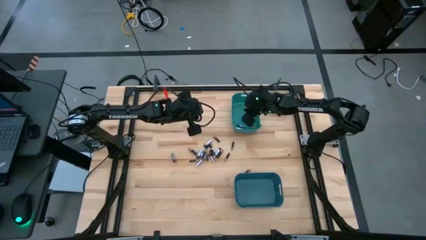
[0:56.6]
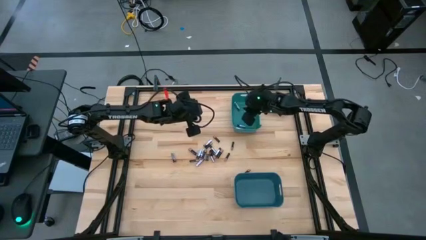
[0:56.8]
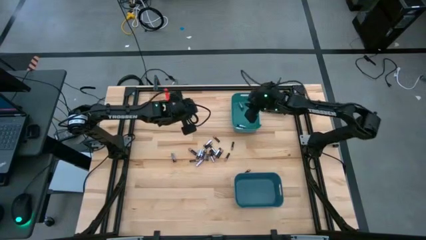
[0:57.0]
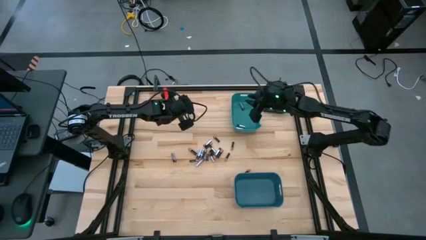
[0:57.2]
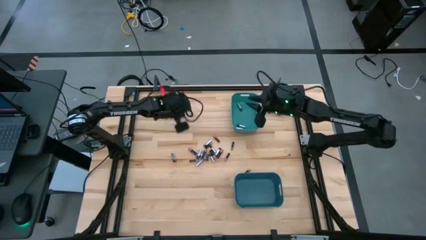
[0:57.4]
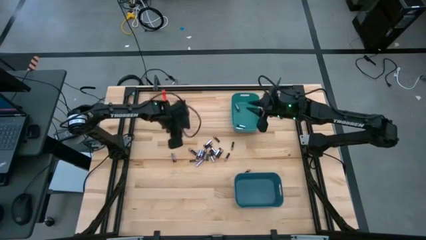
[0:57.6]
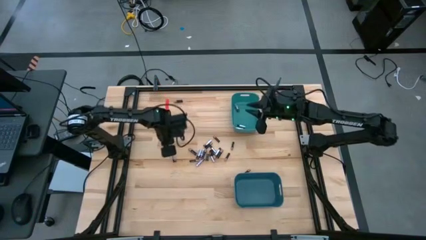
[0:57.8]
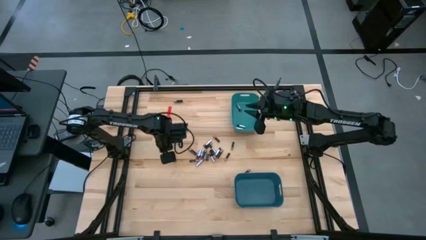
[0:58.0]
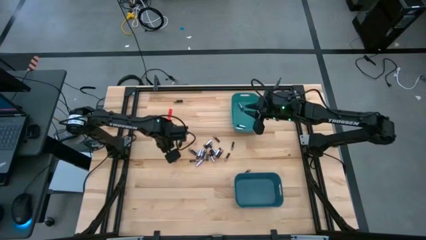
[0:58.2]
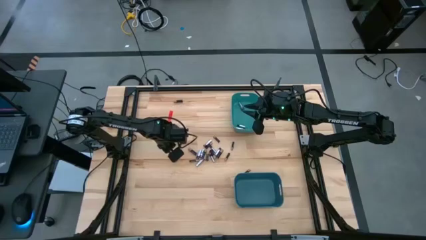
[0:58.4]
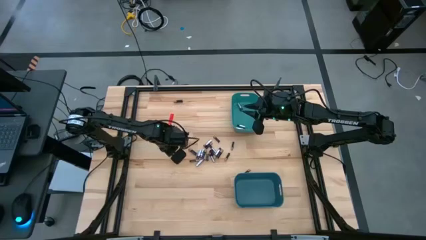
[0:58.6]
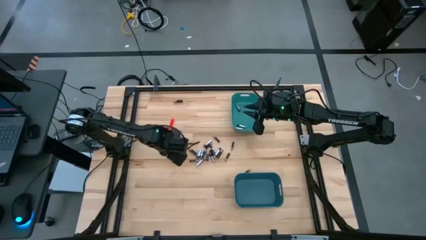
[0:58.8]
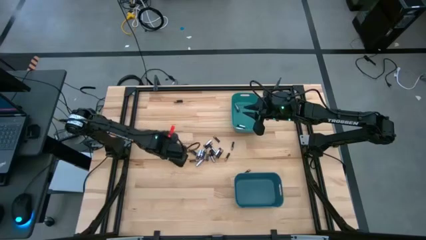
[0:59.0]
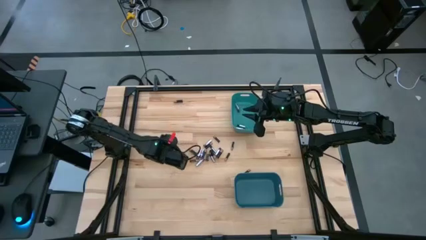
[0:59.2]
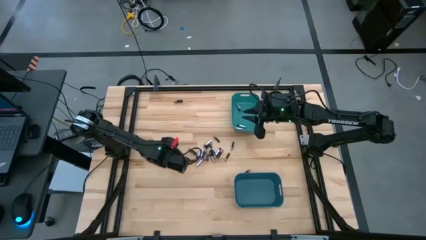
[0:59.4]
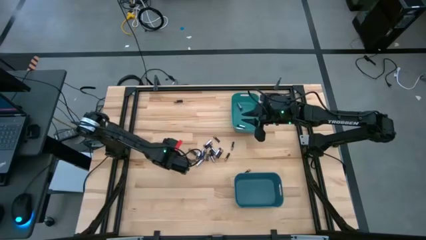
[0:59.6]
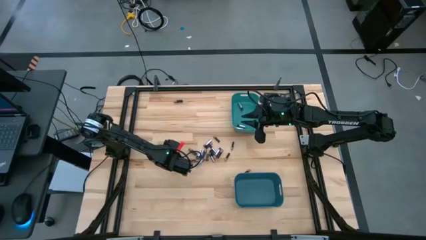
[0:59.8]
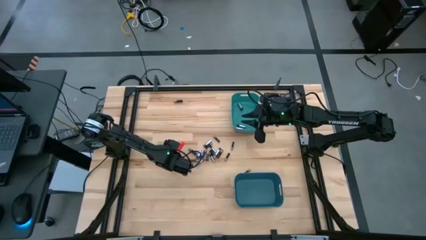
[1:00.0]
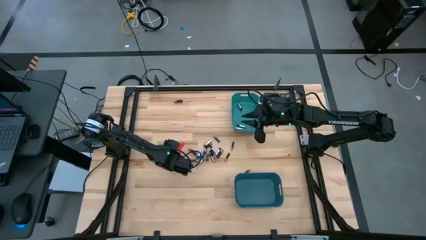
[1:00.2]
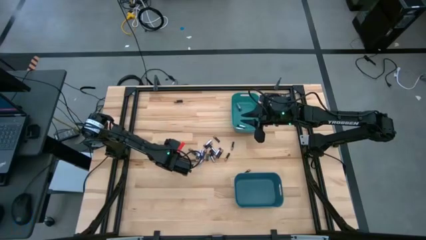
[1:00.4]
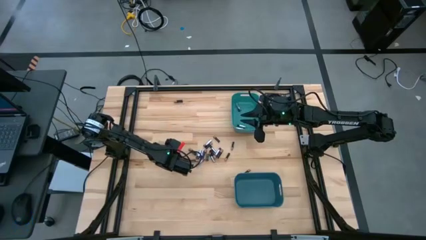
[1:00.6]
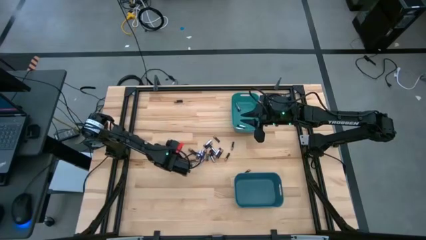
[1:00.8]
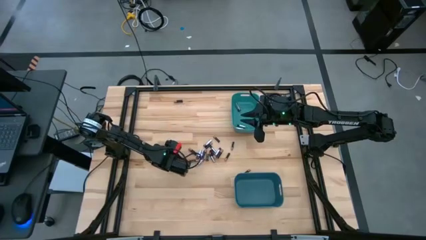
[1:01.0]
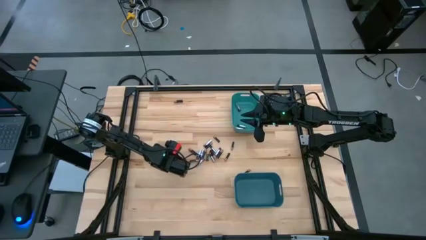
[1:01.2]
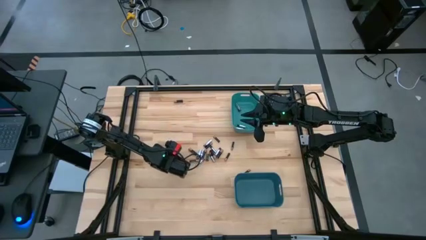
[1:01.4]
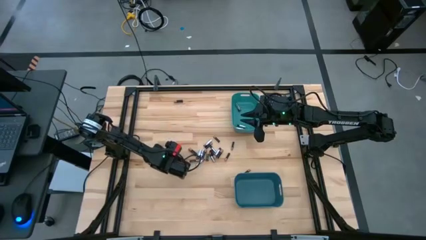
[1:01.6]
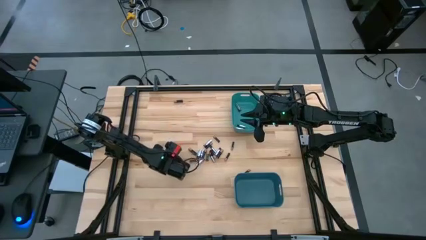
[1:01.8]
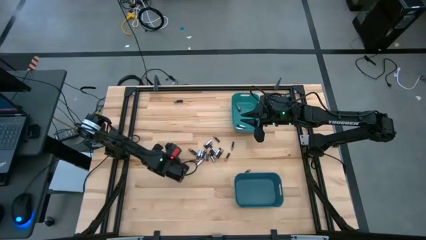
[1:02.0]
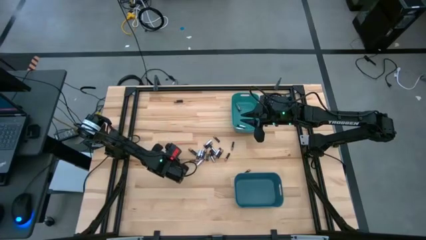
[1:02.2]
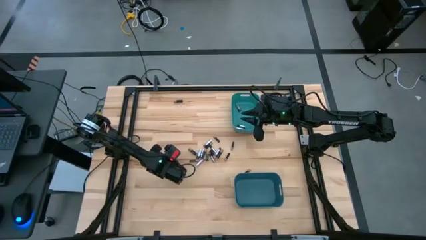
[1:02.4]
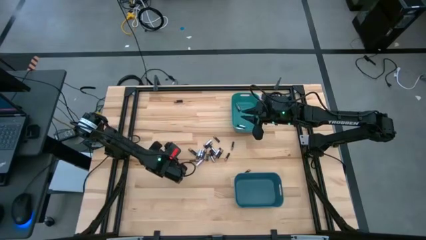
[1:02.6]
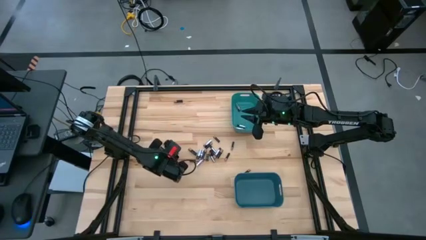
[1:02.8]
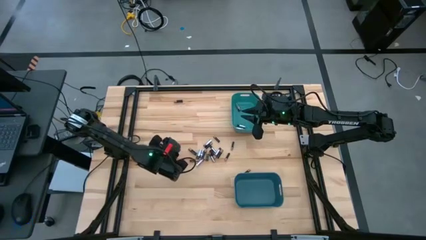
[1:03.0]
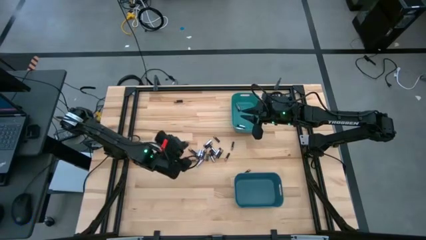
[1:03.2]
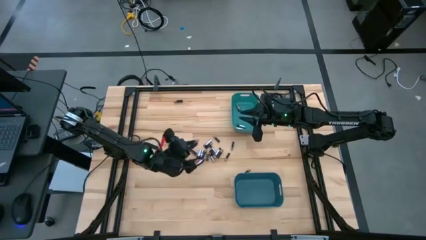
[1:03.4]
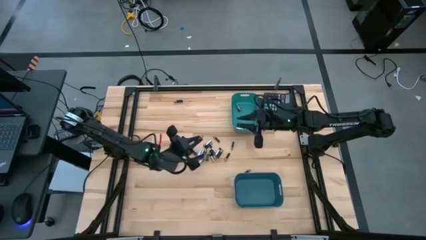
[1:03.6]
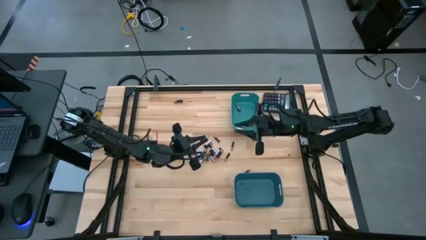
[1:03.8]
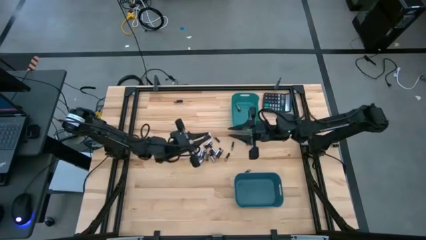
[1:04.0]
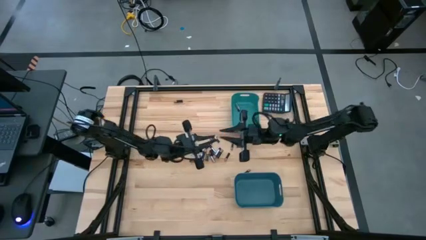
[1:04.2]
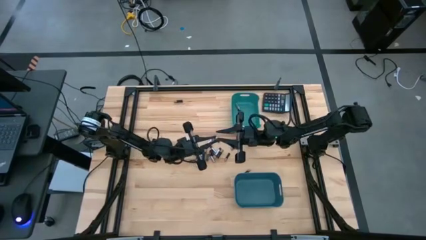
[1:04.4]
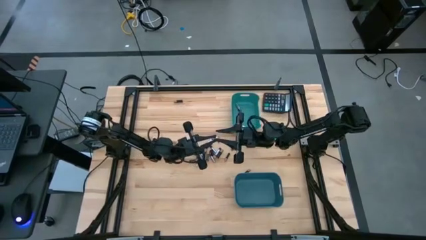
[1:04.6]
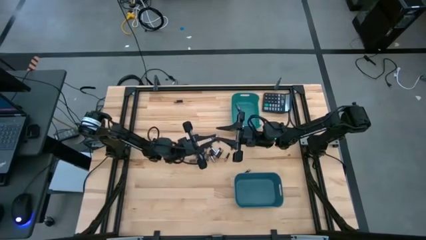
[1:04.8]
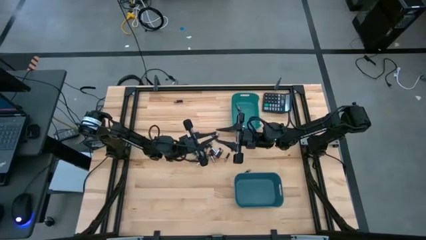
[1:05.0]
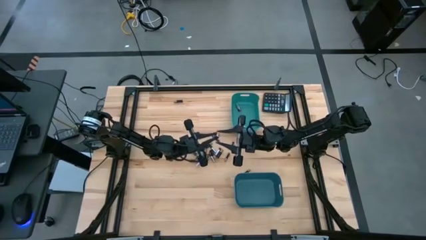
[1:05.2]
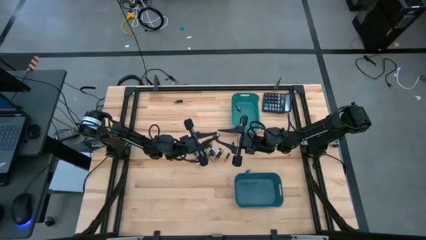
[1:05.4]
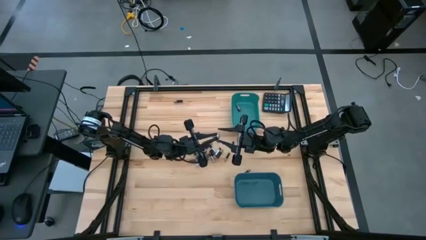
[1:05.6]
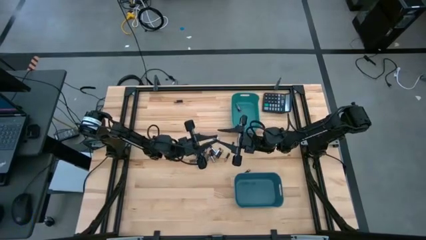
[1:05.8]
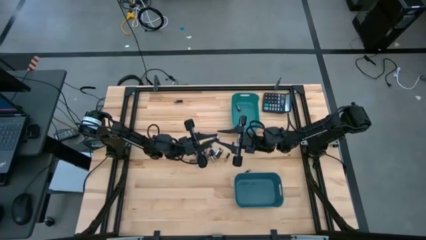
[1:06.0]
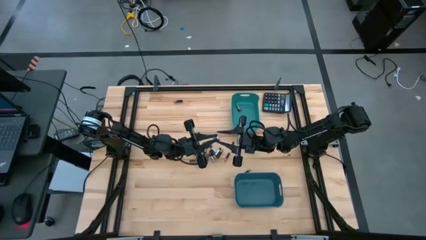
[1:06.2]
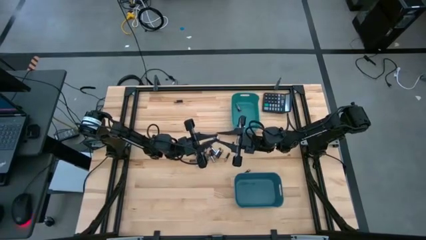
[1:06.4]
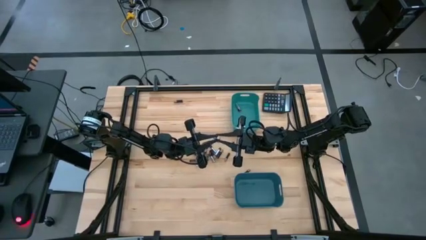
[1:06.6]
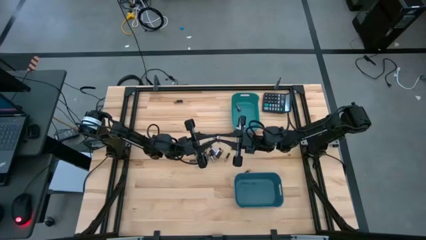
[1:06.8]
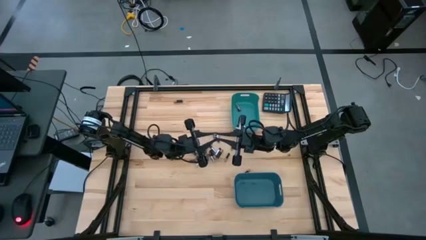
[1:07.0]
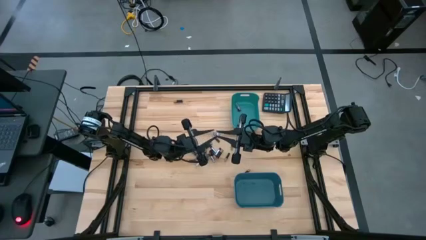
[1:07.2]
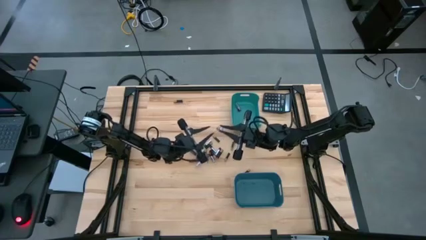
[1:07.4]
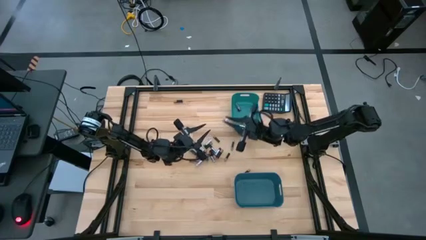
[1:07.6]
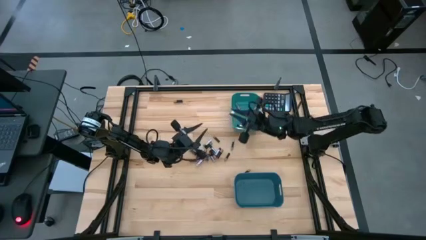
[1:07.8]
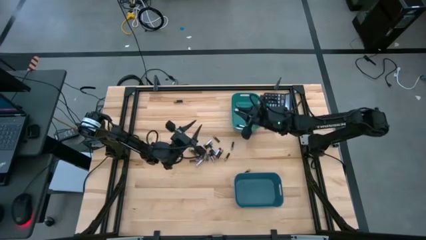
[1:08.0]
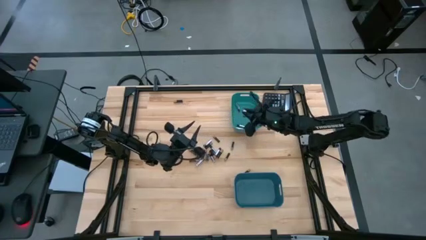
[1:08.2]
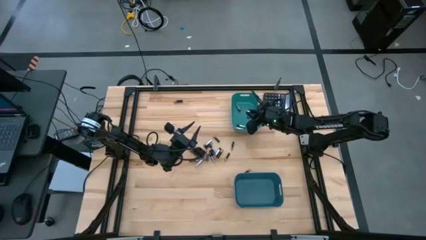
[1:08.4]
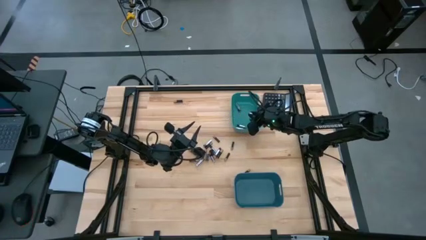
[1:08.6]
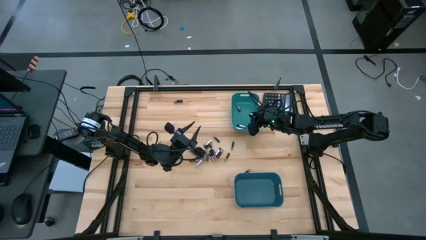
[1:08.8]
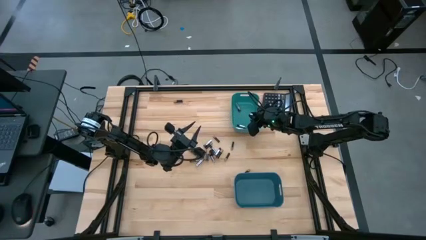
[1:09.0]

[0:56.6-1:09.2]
Task: Sort batteries
Put the silver battery into the green bin

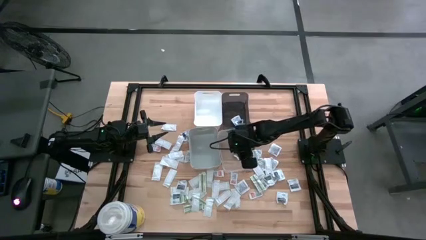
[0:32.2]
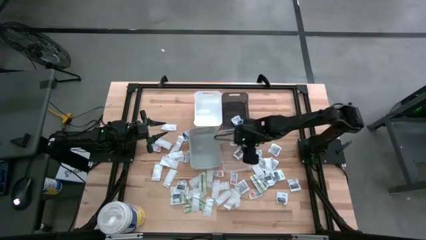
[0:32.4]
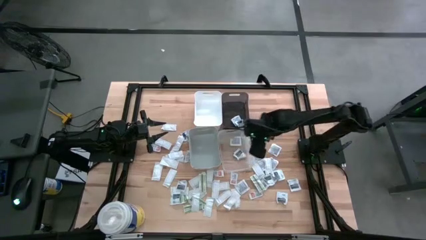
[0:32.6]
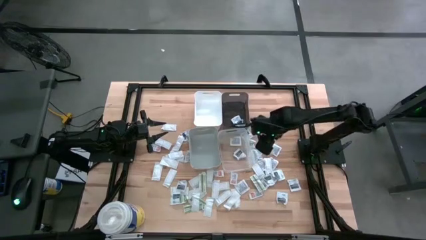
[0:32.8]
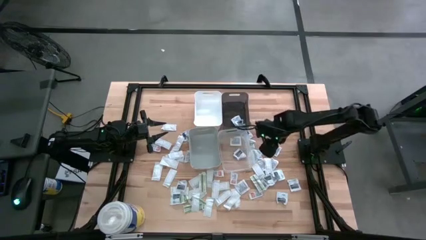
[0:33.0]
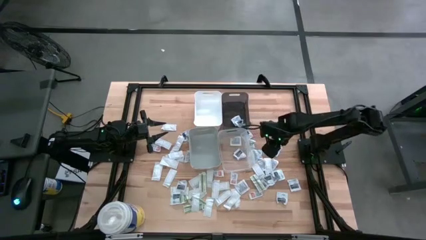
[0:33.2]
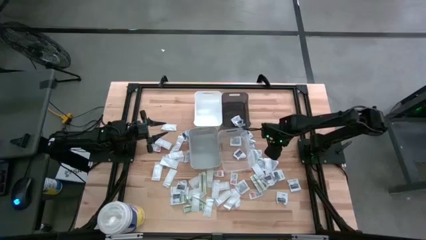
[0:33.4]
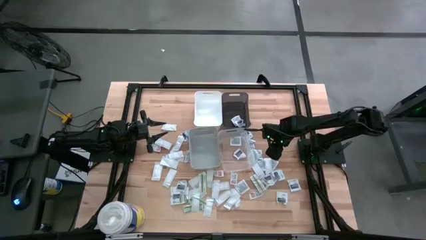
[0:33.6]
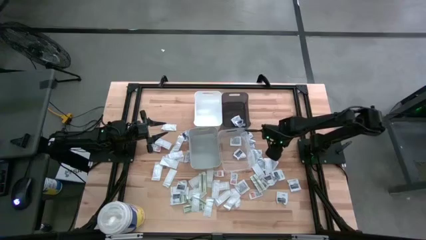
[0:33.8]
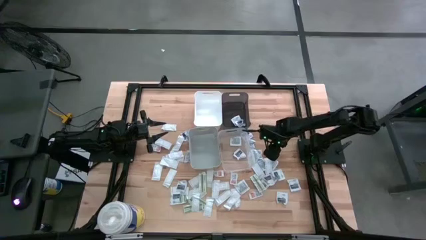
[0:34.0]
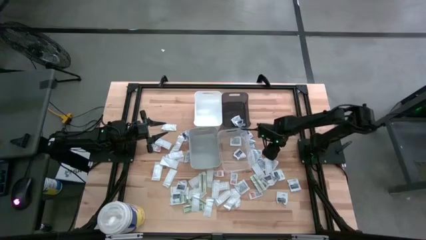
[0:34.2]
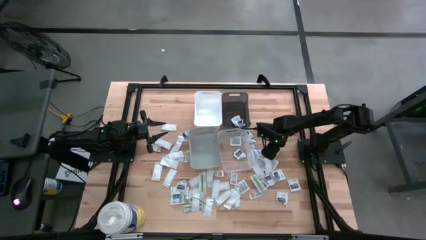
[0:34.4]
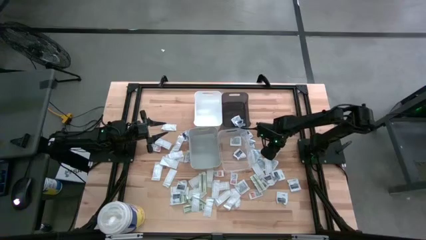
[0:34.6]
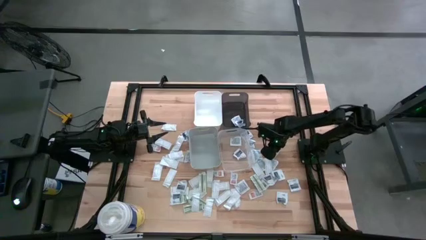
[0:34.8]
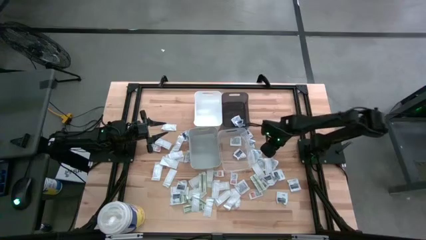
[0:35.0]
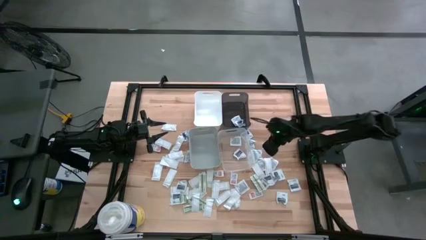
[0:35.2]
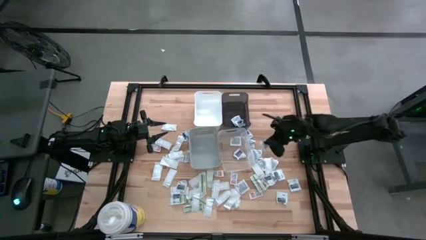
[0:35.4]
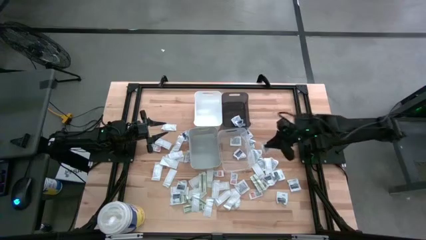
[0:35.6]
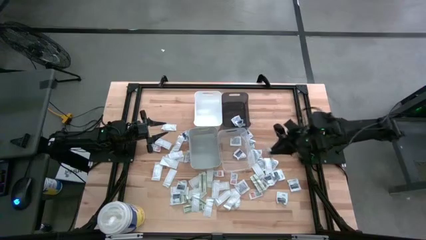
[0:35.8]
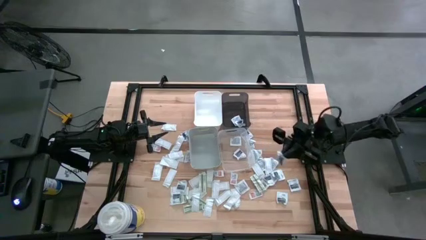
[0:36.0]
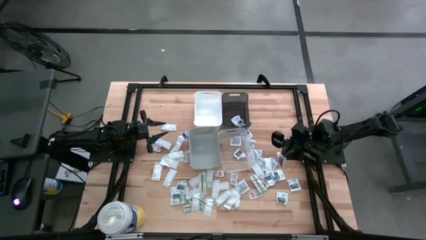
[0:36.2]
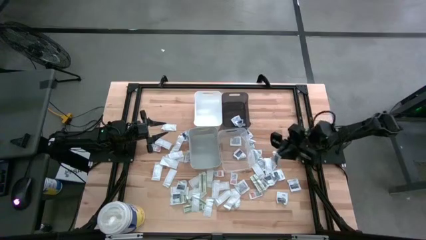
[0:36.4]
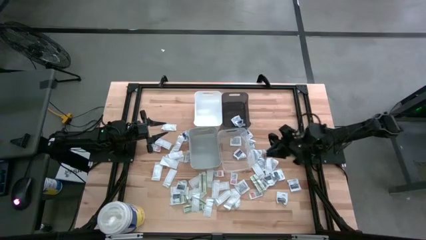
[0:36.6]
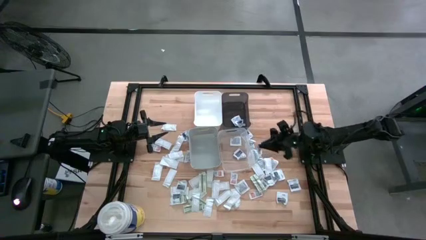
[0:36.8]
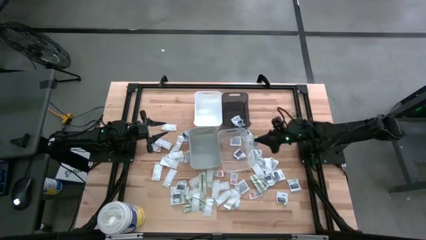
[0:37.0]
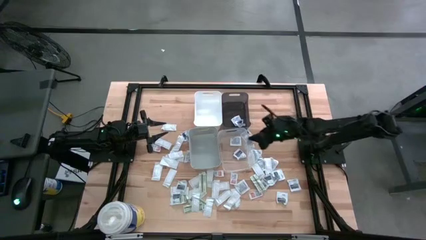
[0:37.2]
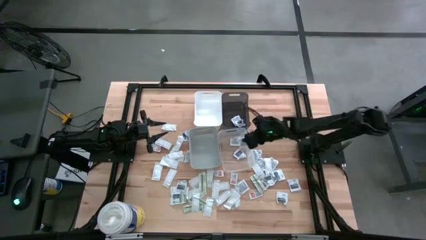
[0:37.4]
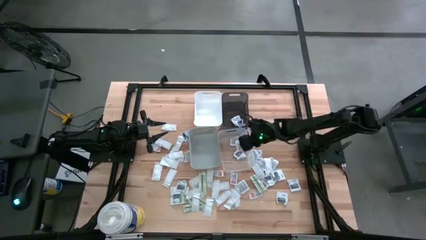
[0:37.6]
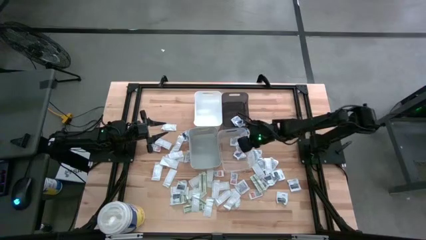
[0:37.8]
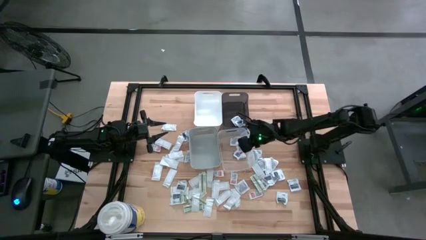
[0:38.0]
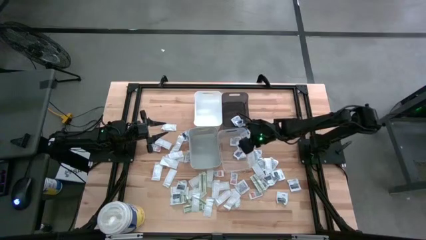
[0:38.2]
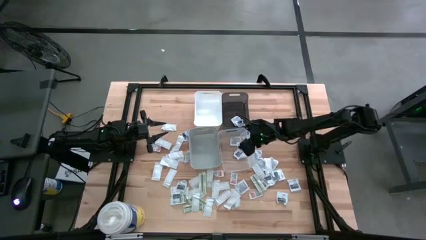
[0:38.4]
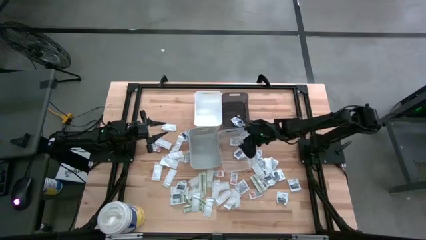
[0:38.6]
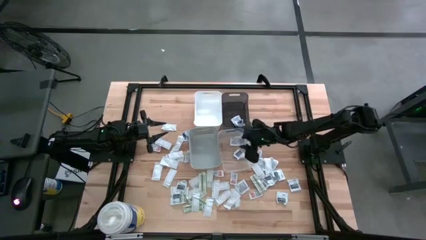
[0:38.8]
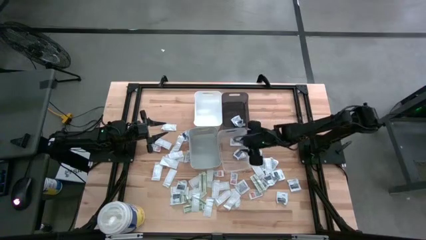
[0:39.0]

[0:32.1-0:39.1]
Task: Pick & Place First Aid Supplies
Put the gray towelette pack into the transparent bin
